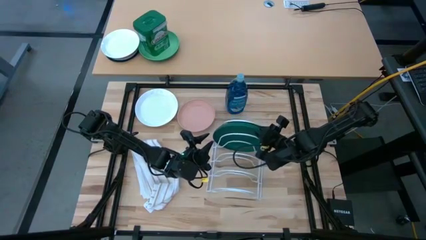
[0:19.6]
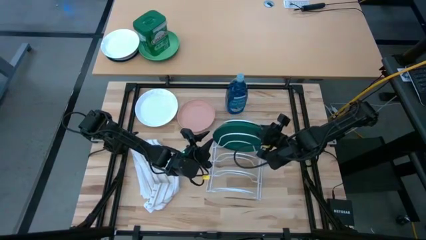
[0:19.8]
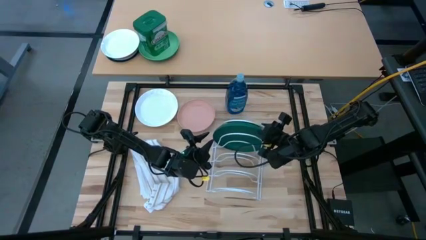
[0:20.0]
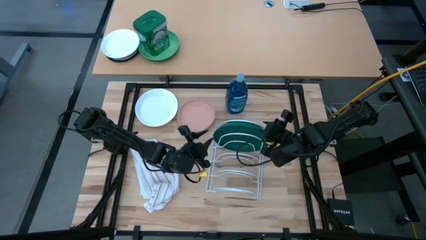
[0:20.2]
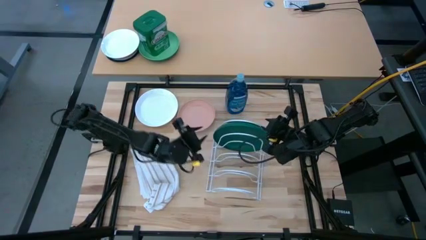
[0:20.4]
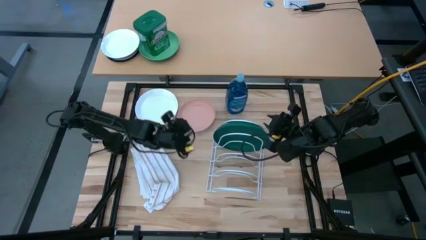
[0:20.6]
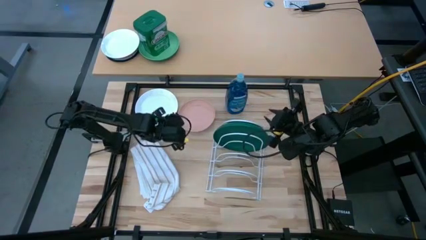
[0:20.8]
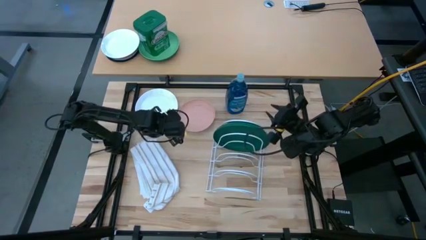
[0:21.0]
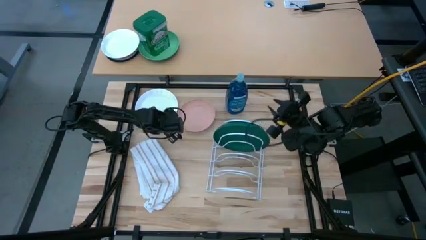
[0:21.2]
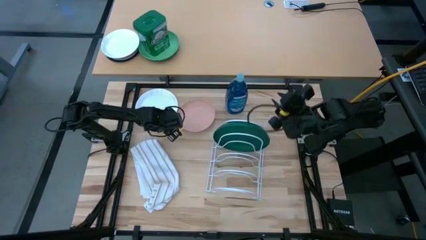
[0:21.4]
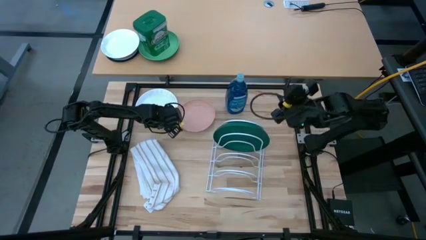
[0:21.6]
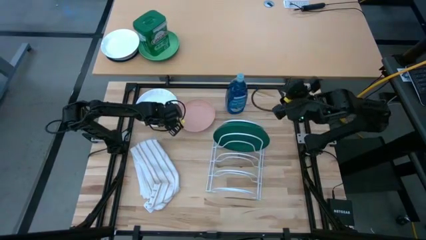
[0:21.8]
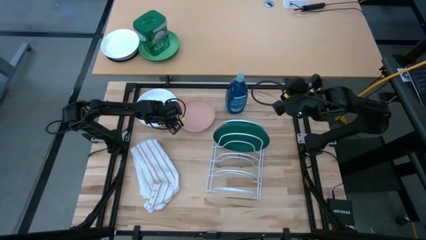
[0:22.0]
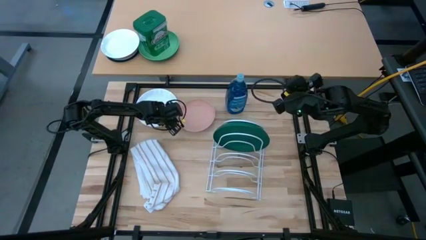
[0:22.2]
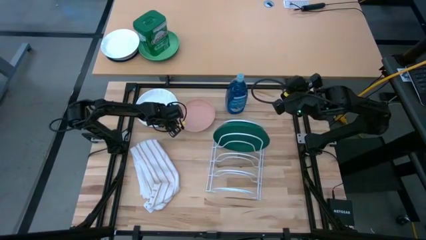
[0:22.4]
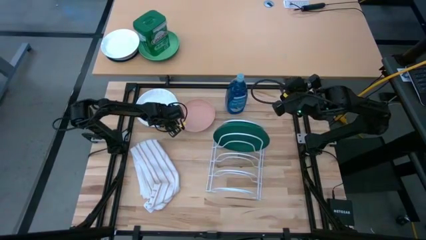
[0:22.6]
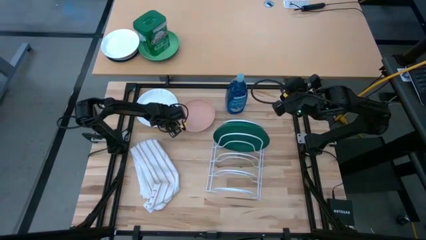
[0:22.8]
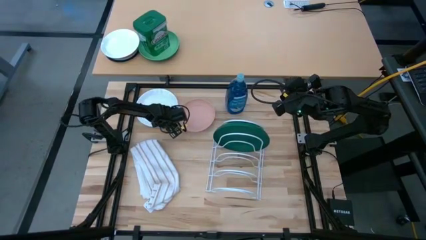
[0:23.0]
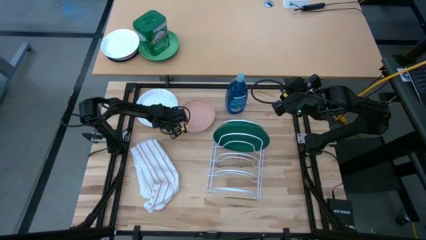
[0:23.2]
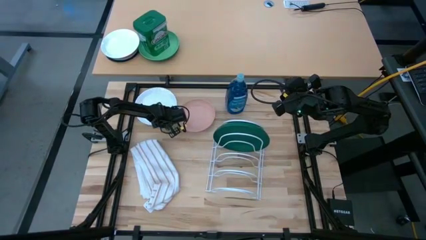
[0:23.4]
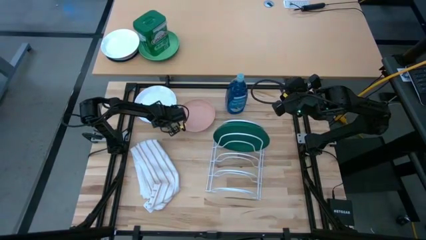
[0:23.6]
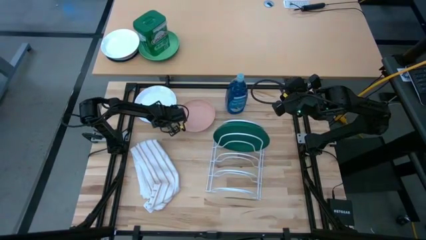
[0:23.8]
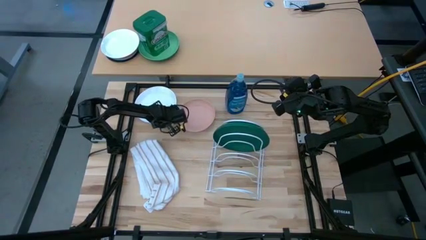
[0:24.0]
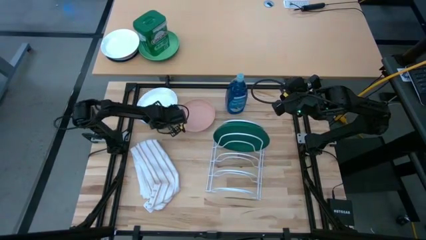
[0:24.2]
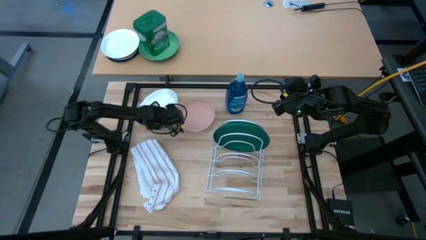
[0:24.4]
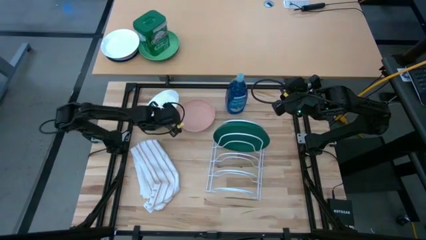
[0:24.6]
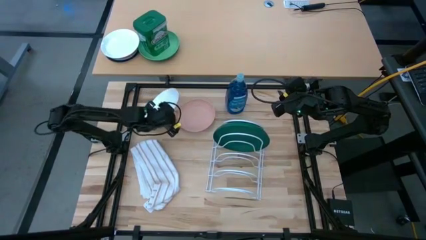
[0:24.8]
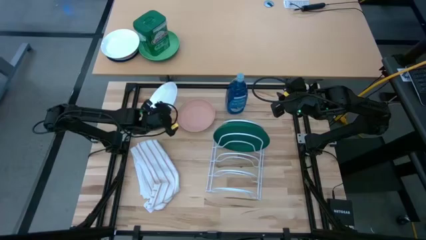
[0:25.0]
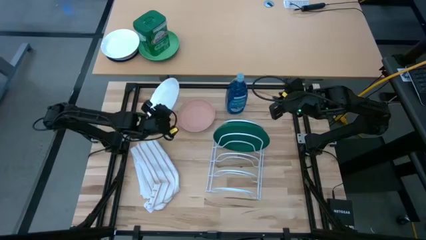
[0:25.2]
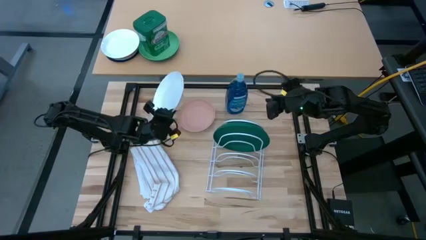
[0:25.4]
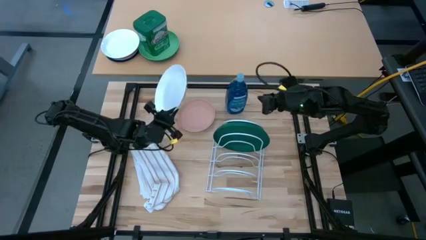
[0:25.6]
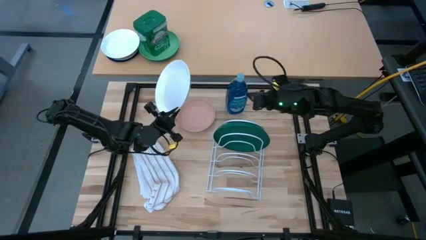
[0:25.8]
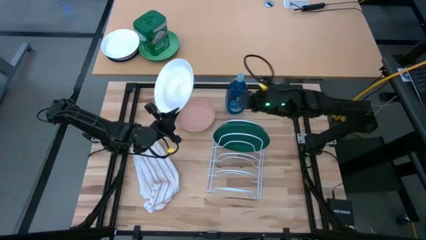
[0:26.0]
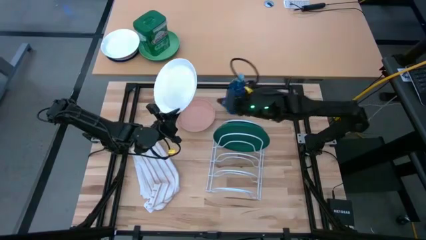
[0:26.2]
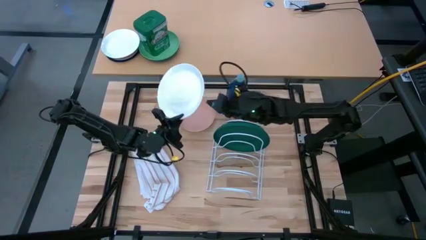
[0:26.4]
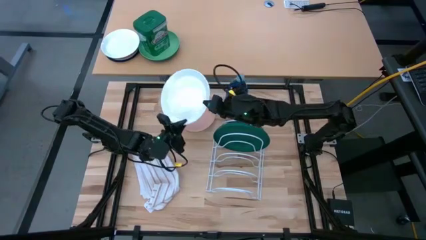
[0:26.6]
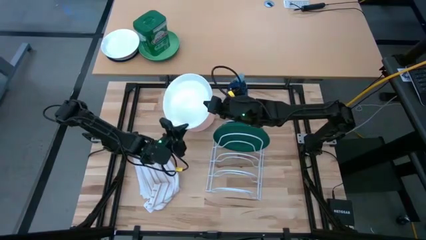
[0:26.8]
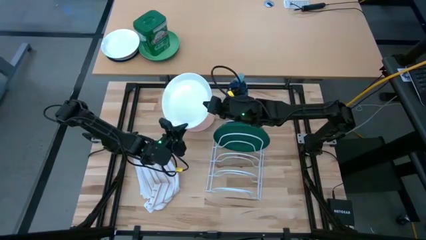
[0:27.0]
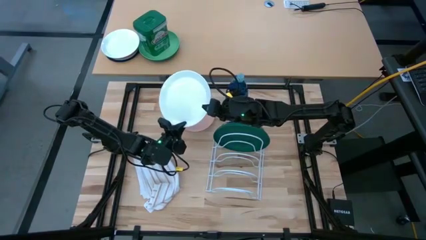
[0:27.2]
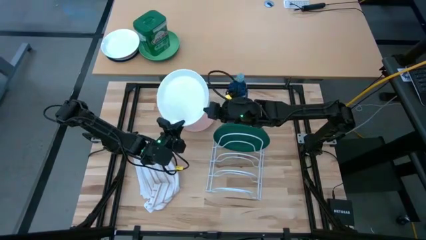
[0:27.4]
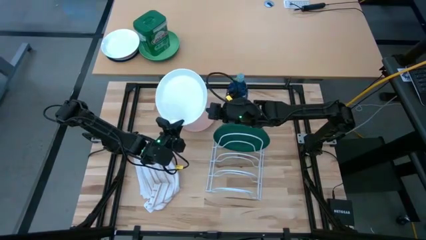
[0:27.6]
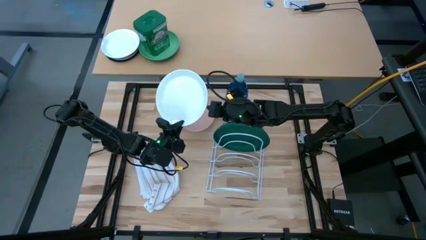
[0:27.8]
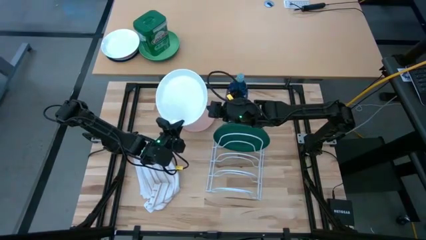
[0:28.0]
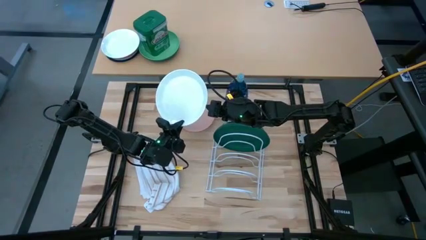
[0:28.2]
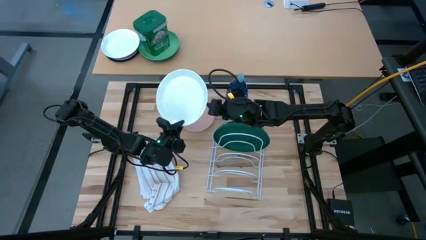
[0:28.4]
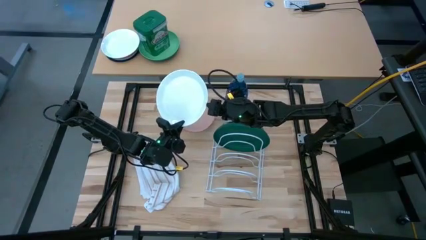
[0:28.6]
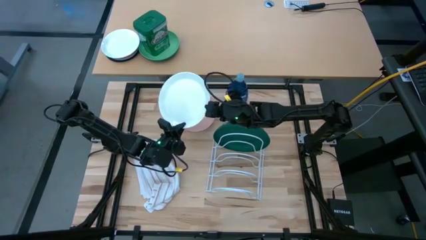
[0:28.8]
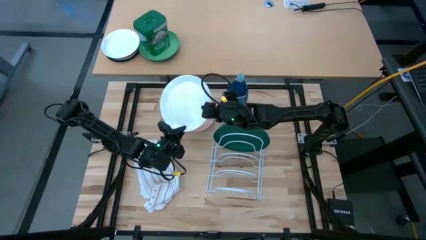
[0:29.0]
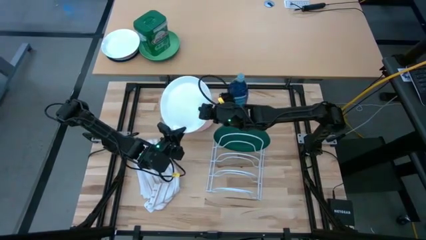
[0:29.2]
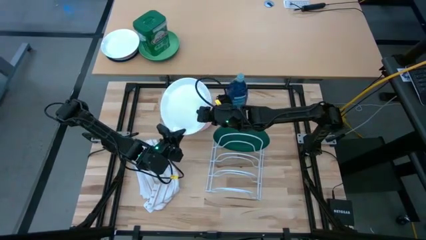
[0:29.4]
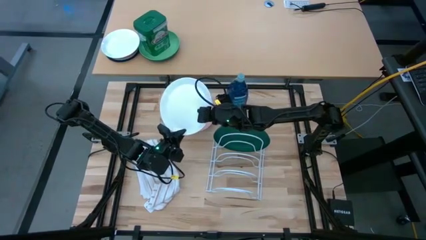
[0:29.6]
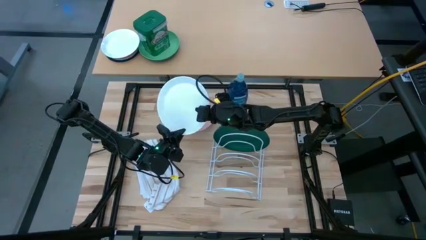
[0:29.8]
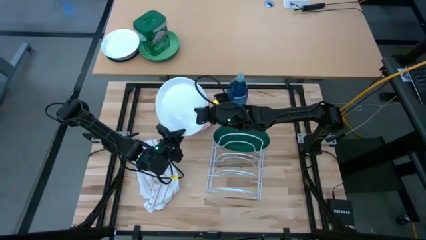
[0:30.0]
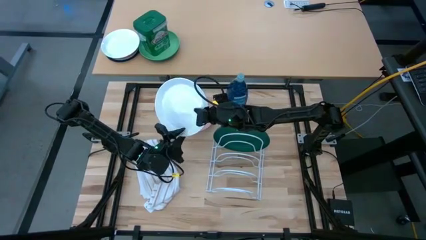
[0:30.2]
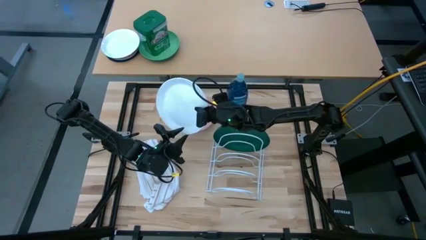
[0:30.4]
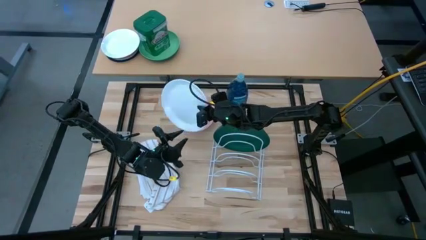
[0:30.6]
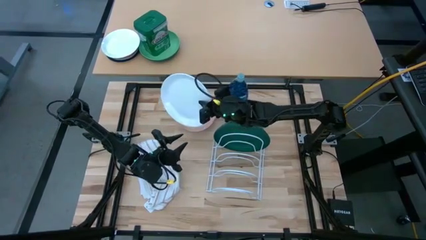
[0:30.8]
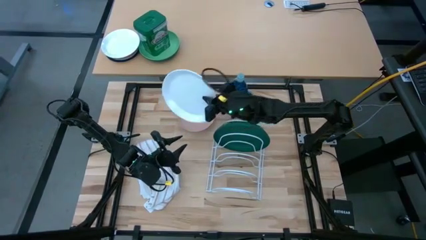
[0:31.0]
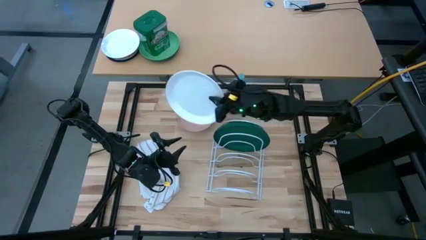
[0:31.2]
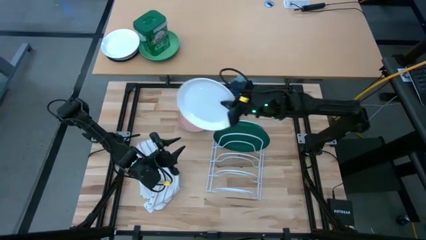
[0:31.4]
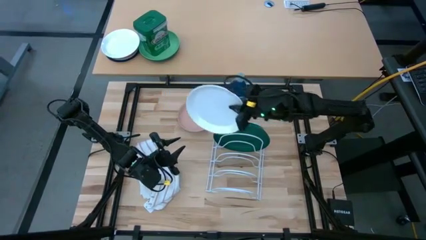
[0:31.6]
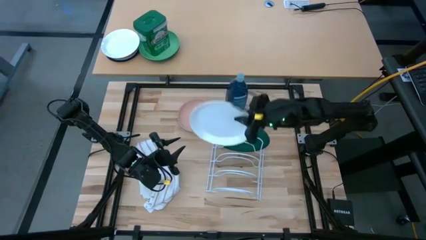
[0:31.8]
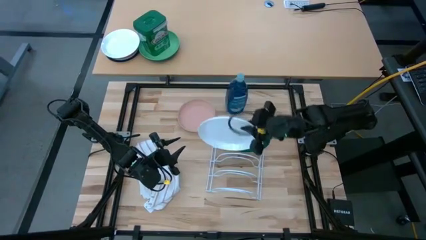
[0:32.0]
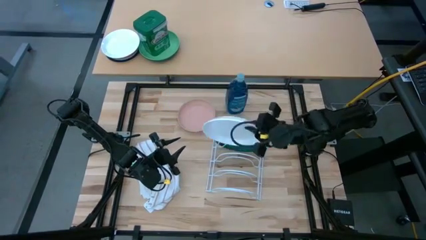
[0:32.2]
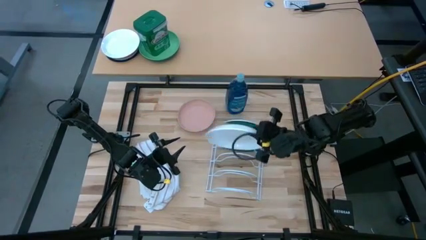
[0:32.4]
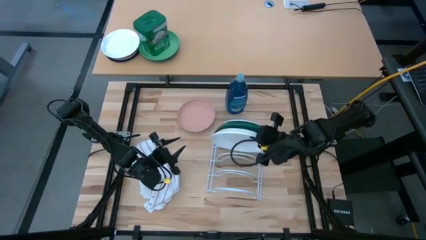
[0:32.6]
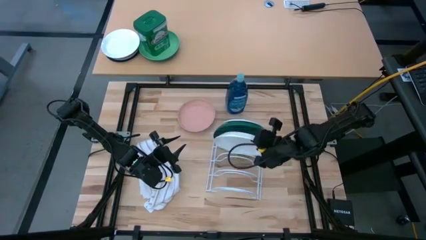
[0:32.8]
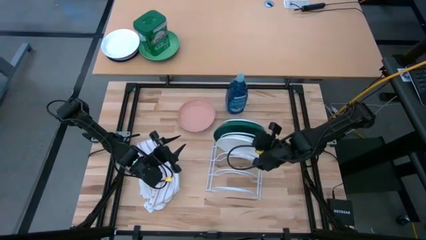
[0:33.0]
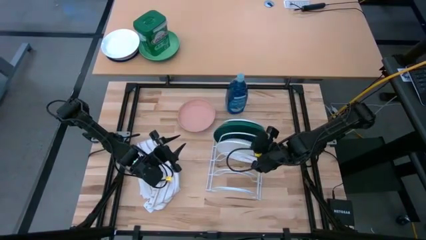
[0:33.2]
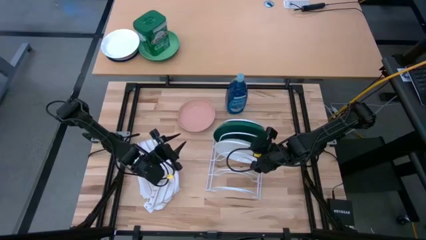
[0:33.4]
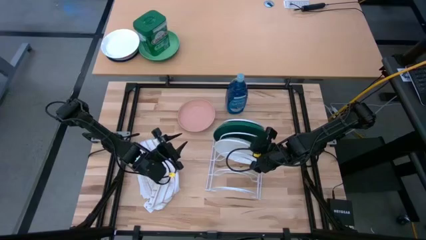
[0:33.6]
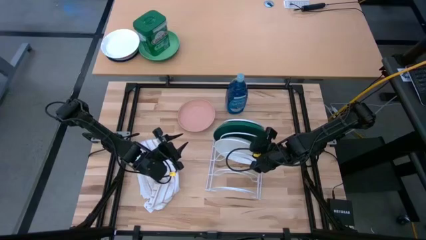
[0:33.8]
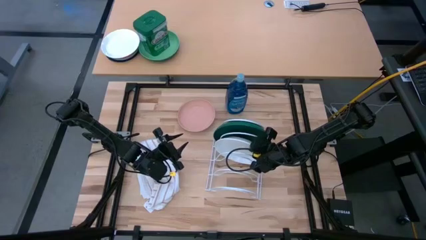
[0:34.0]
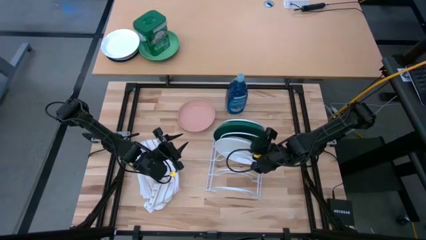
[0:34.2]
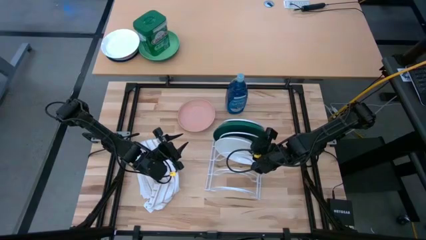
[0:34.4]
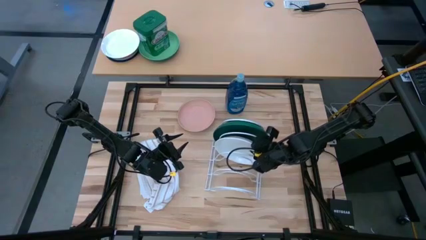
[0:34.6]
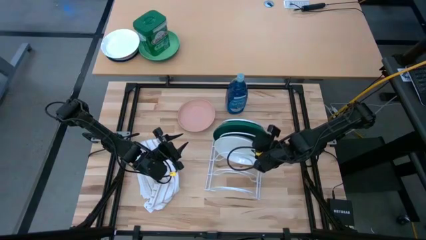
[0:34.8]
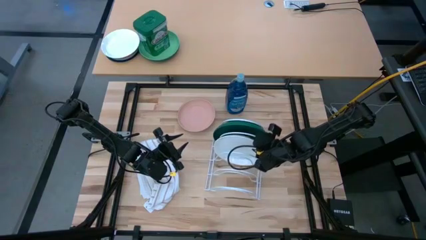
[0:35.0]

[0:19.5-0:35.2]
Task: Sort dishes
Put the white plate in the dish rack
